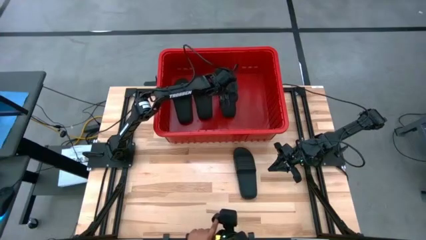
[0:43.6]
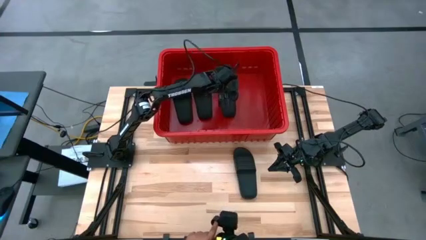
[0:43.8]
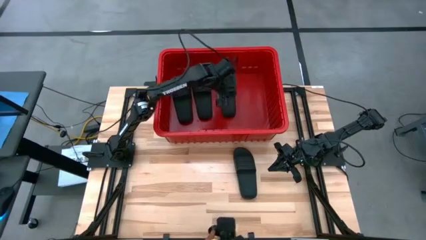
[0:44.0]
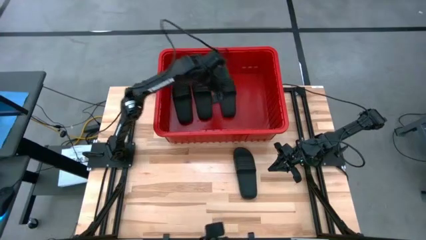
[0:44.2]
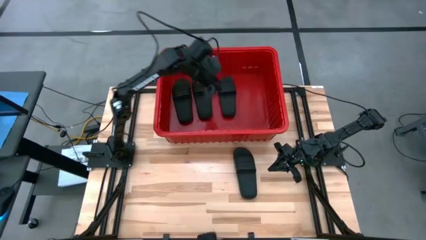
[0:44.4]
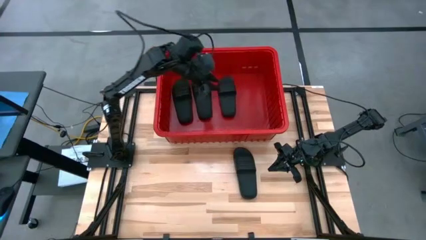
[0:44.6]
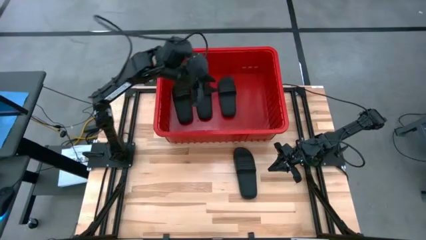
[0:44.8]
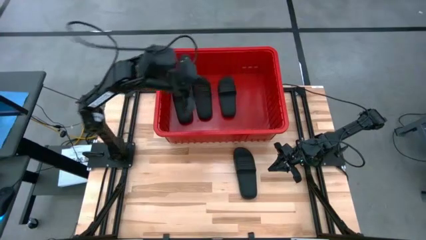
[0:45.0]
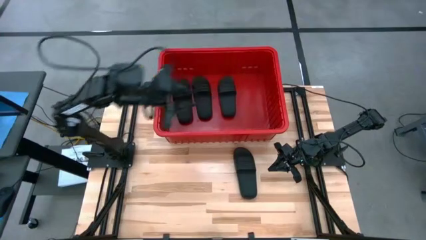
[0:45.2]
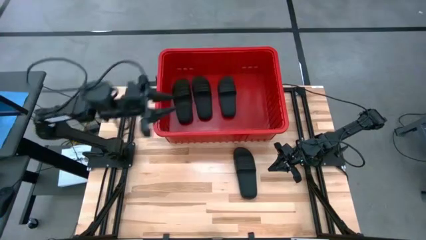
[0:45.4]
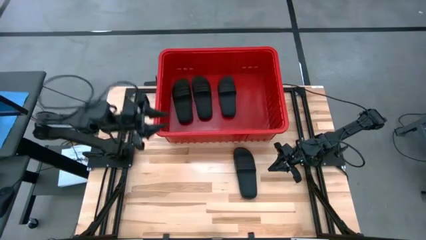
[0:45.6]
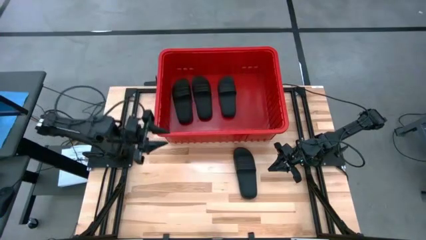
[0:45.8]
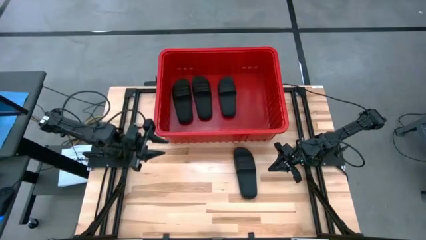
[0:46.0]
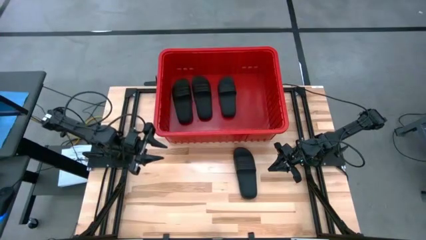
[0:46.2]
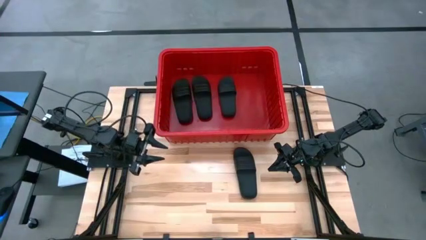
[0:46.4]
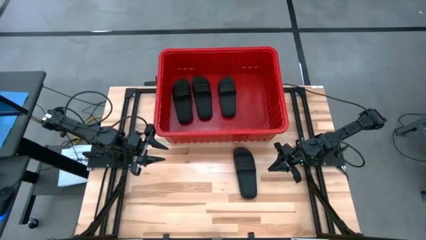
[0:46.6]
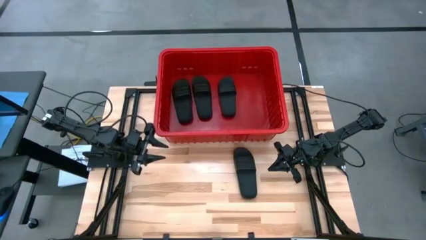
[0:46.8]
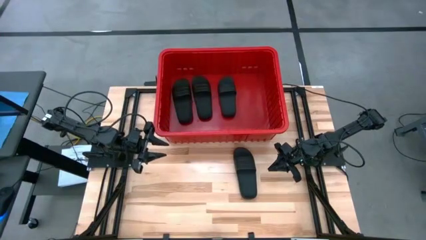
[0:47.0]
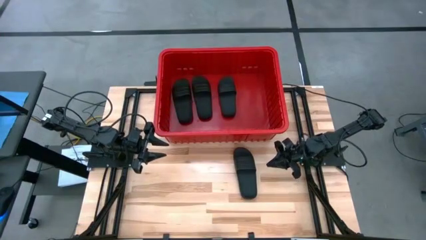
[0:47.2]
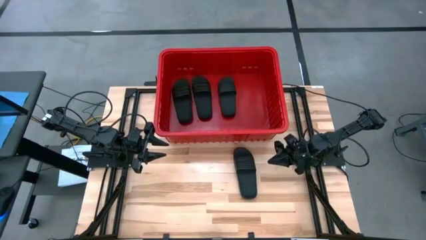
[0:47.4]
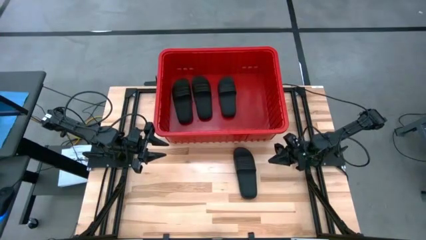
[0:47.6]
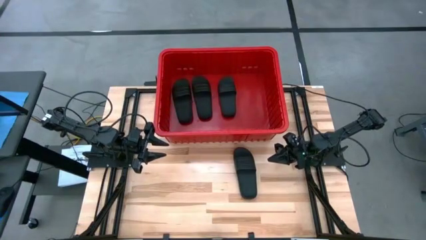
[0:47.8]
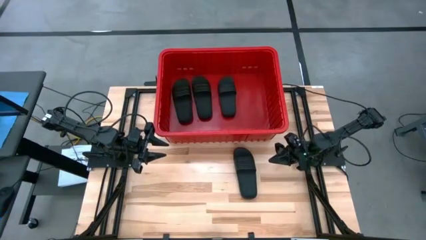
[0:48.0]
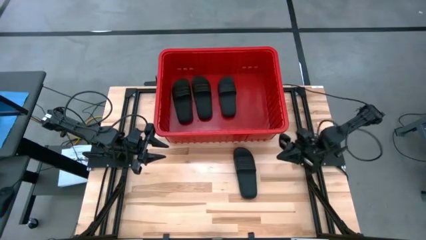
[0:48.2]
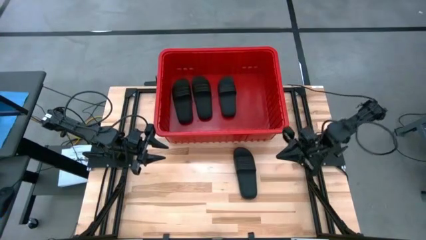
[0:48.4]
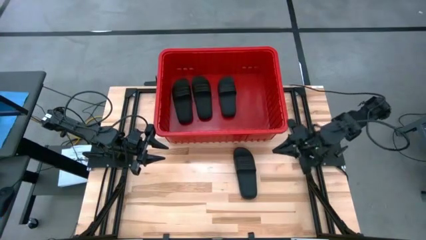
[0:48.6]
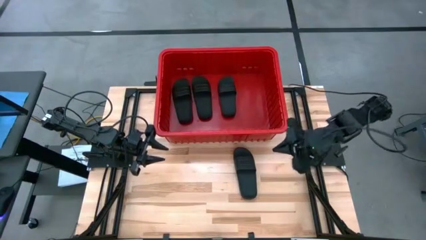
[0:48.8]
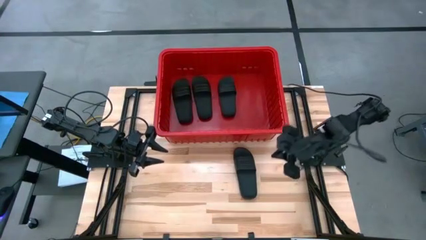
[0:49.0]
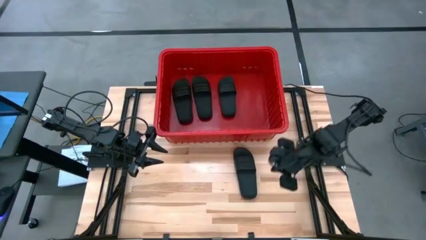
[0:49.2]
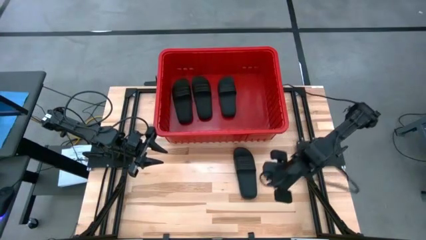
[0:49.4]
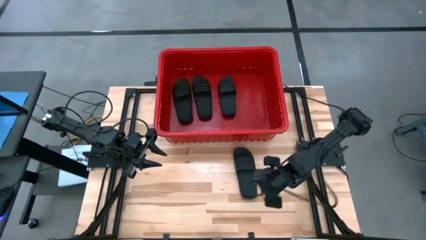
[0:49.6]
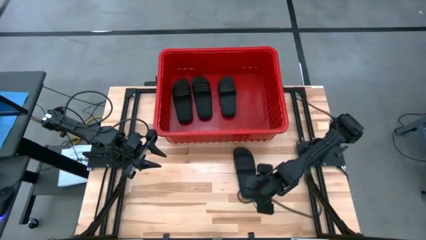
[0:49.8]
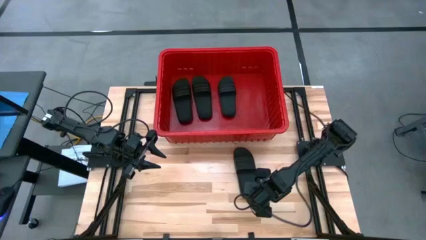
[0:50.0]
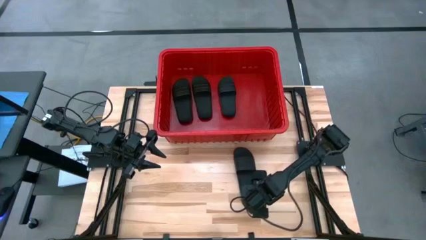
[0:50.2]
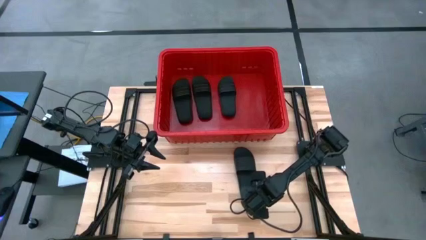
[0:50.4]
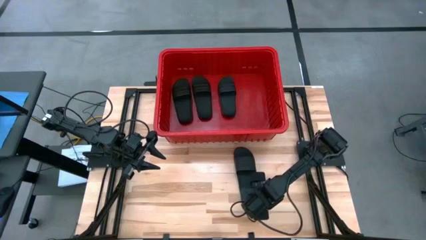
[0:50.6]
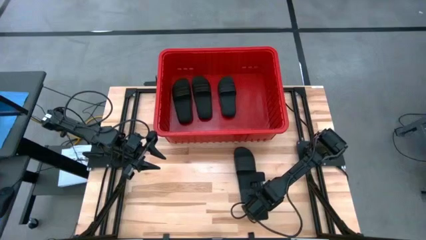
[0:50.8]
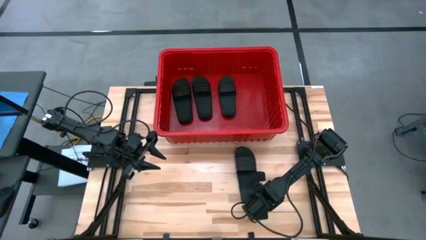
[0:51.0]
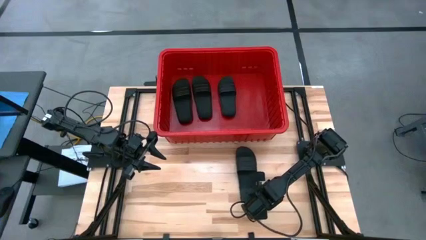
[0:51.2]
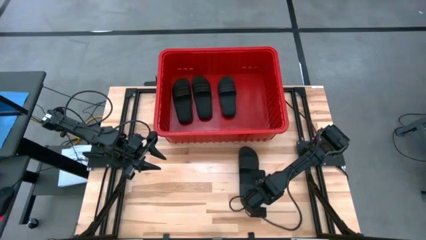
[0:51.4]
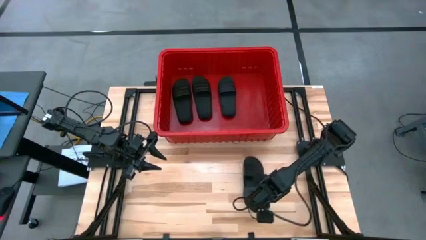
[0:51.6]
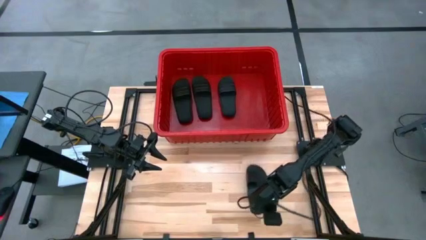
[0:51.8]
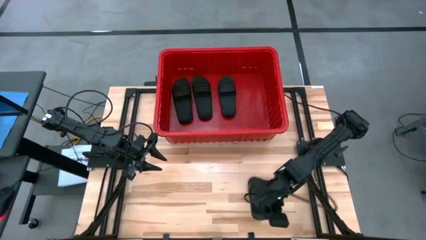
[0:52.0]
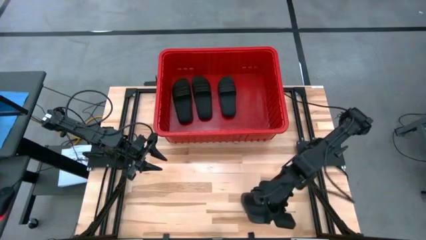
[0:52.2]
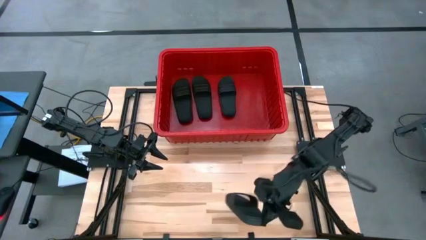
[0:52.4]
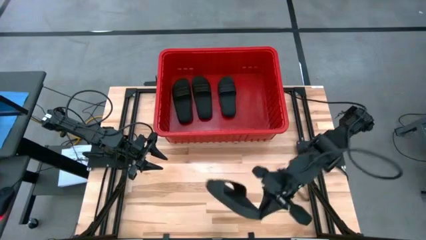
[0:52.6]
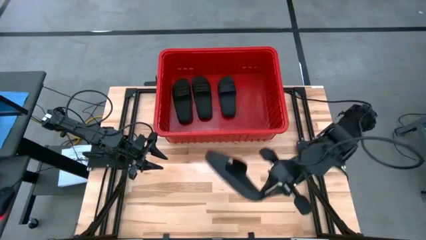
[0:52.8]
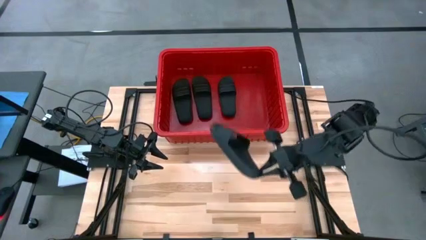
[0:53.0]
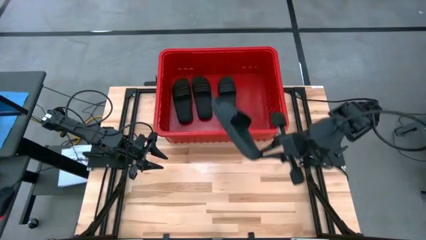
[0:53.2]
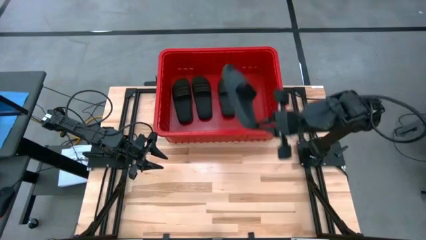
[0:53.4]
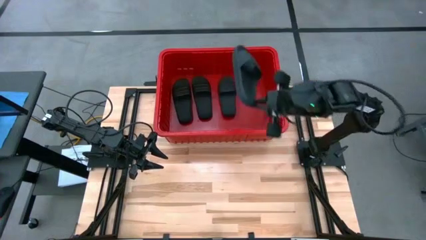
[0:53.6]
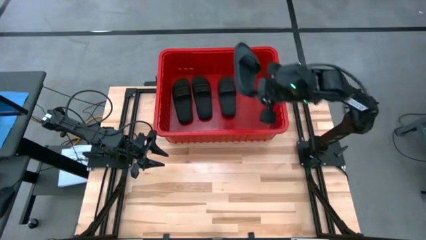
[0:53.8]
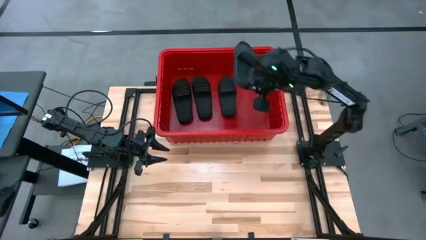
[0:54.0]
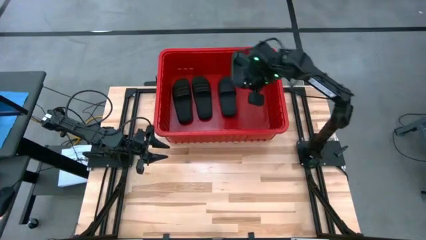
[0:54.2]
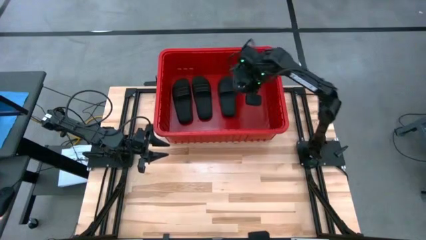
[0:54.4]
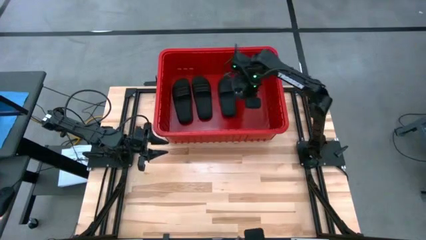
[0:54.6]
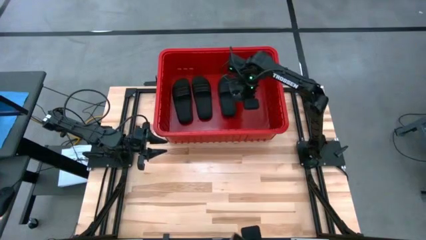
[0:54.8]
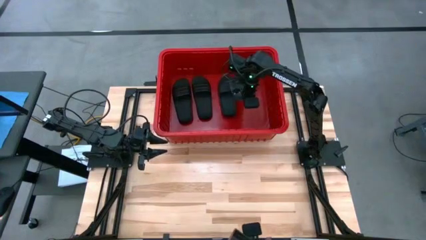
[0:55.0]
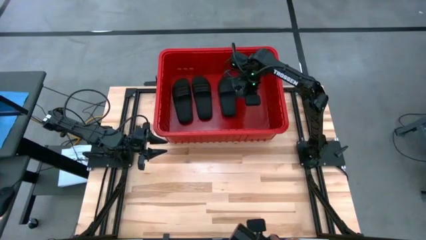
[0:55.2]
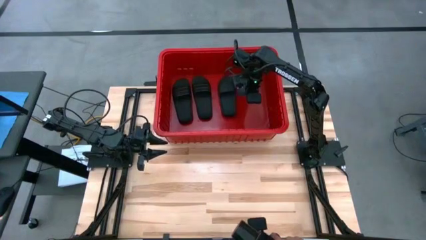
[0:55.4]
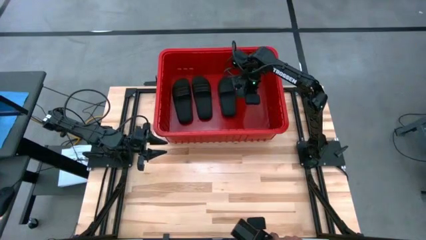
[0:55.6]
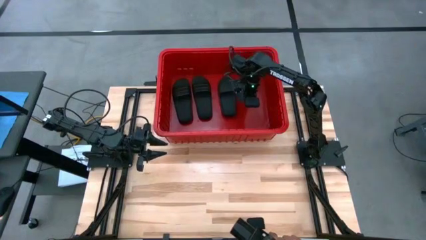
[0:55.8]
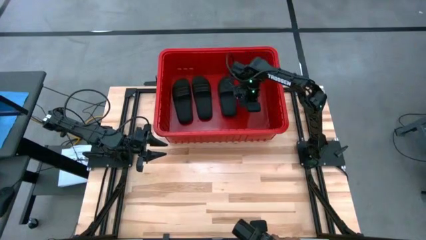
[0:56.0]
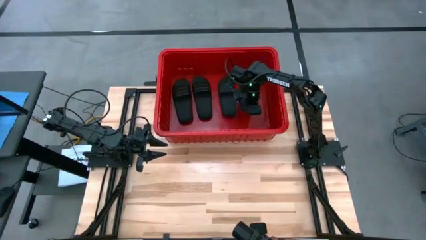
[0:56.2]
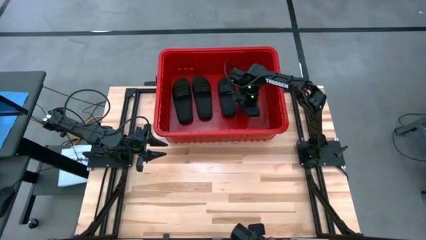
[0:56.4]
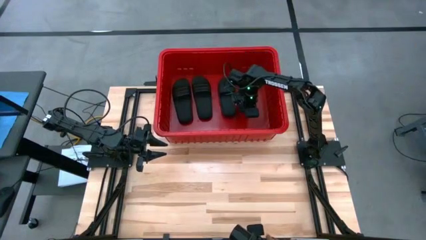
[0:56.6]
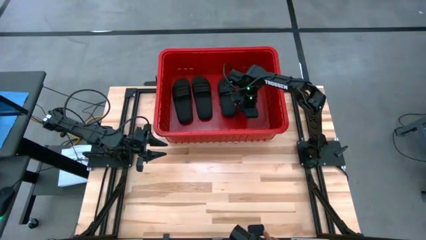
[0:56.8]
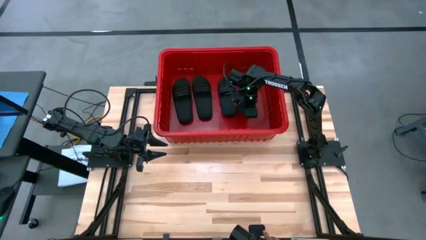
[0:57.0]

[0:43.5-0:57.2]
Task: Pick and place slides into bin
Put the black slipper into the red bin
